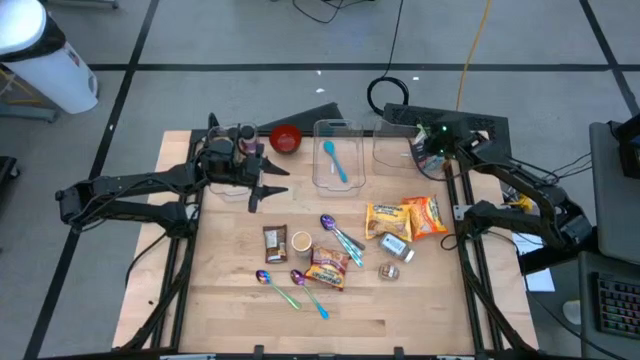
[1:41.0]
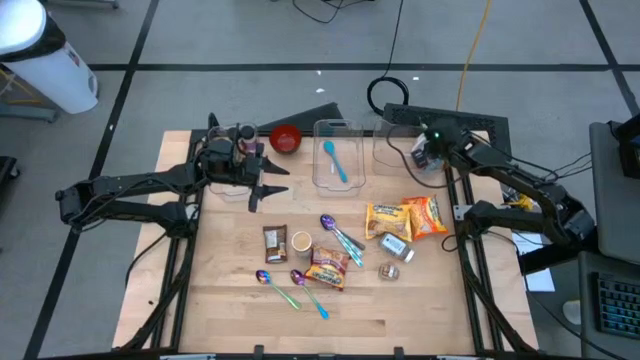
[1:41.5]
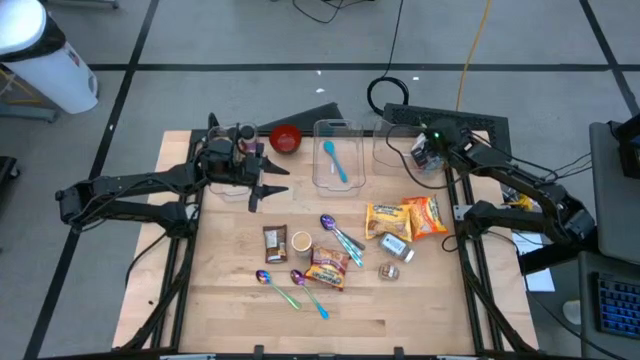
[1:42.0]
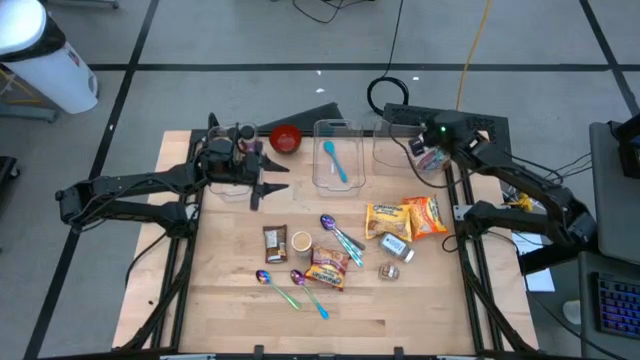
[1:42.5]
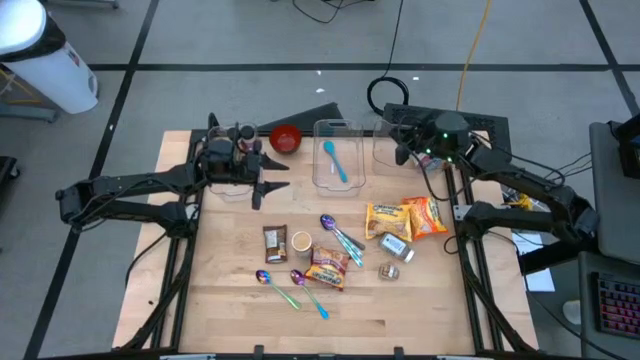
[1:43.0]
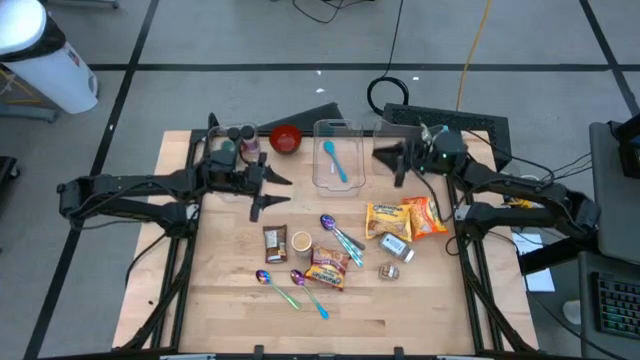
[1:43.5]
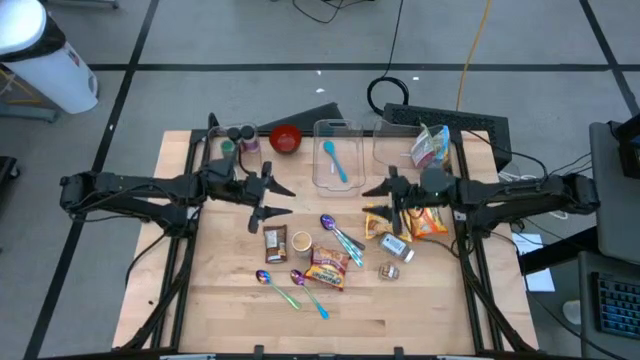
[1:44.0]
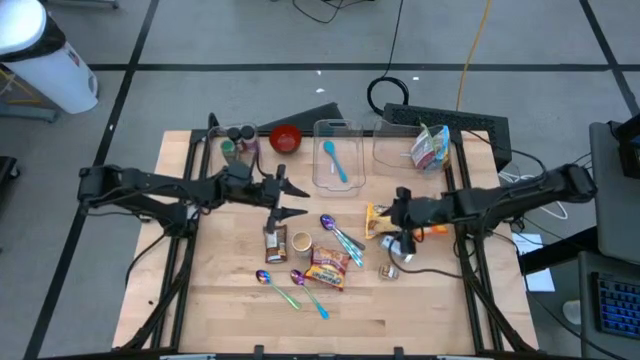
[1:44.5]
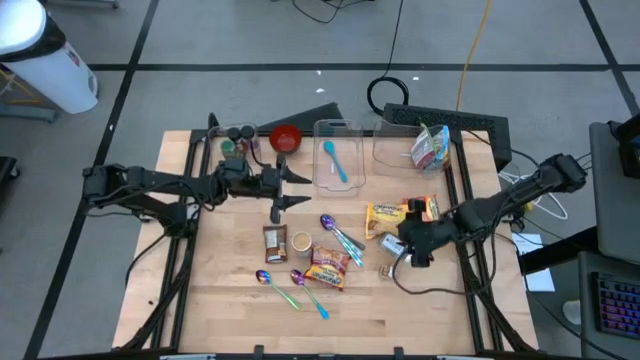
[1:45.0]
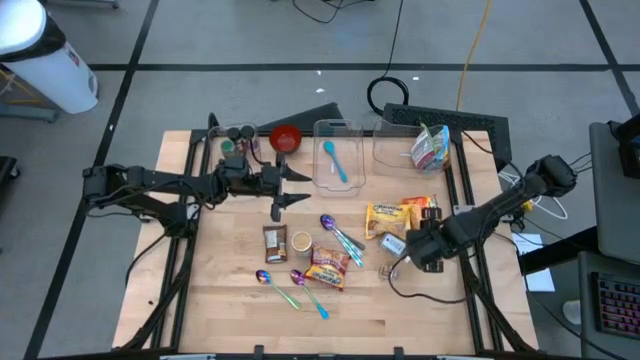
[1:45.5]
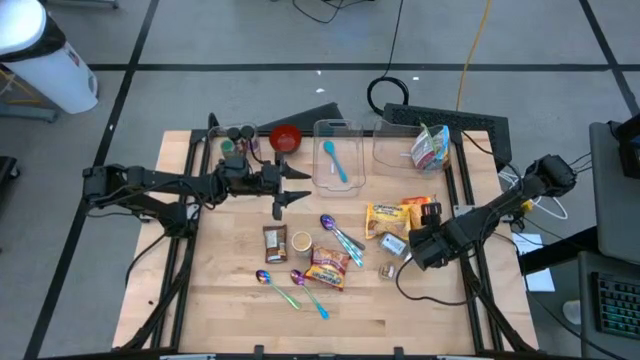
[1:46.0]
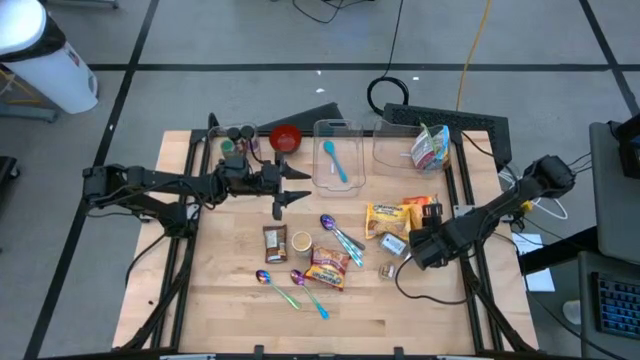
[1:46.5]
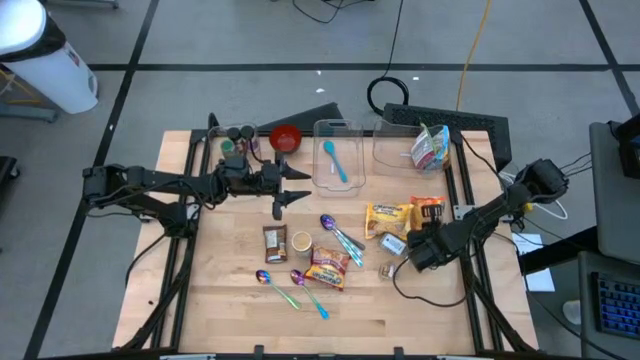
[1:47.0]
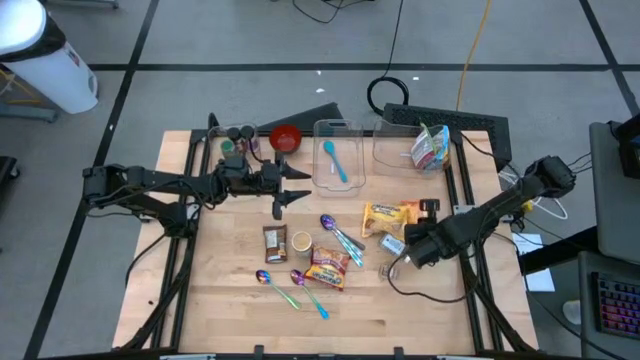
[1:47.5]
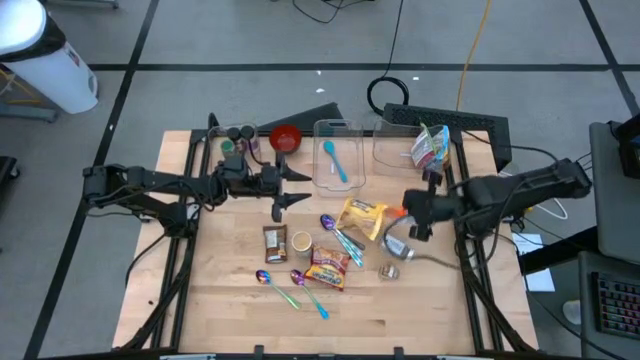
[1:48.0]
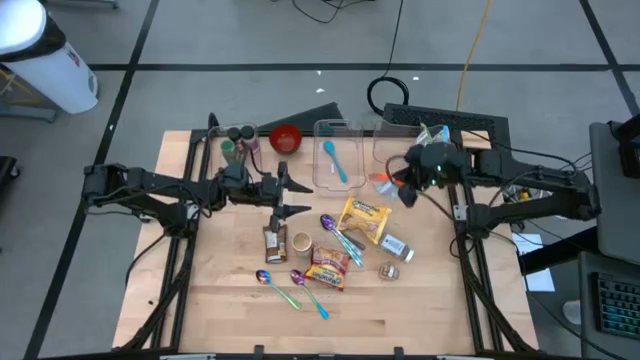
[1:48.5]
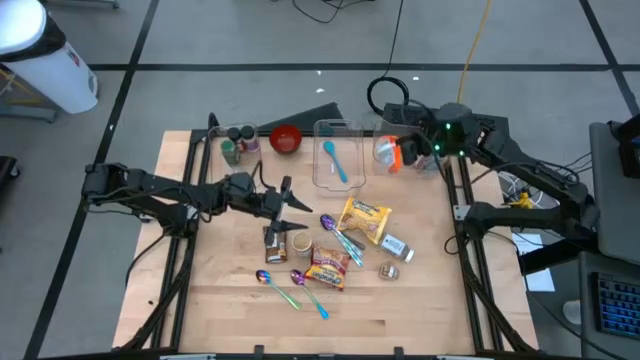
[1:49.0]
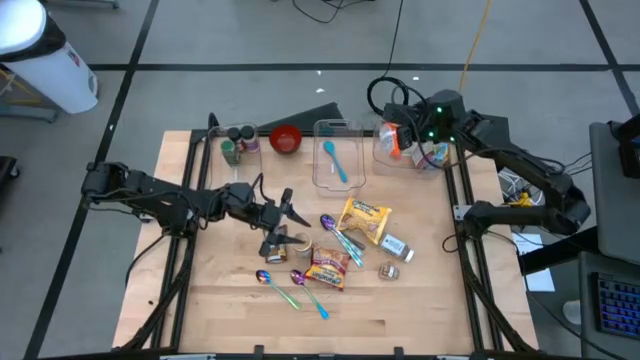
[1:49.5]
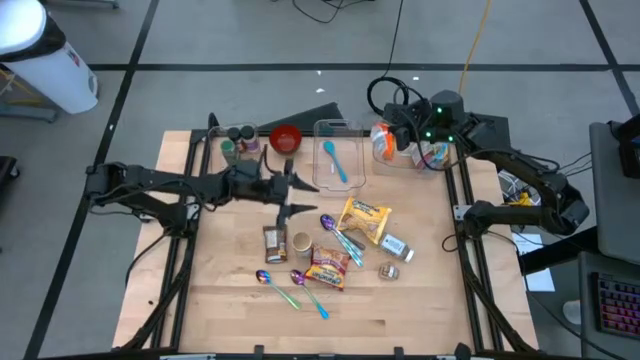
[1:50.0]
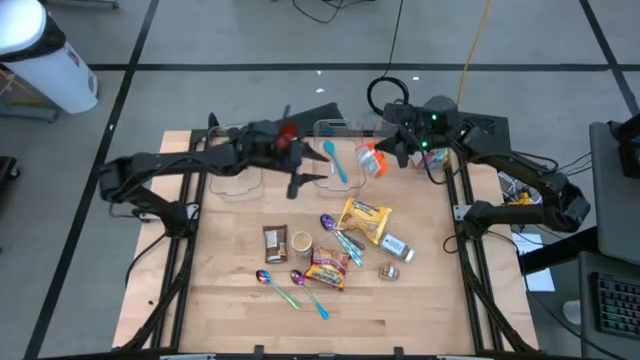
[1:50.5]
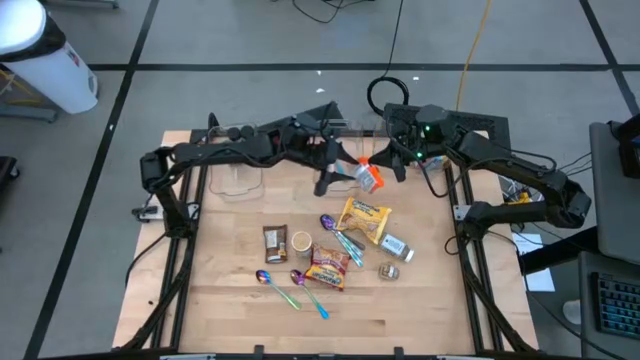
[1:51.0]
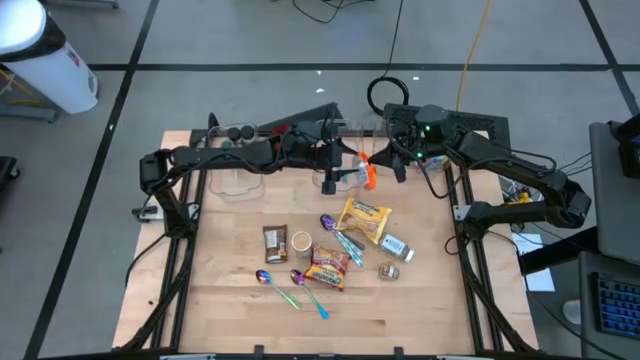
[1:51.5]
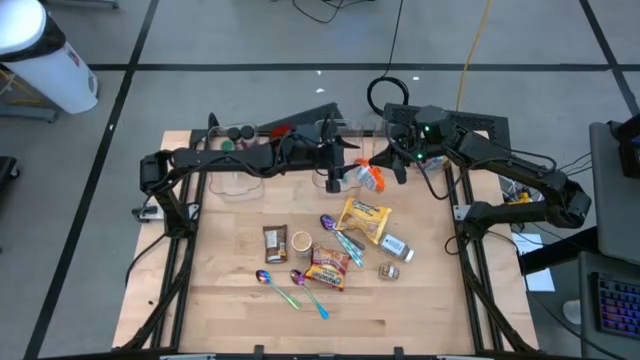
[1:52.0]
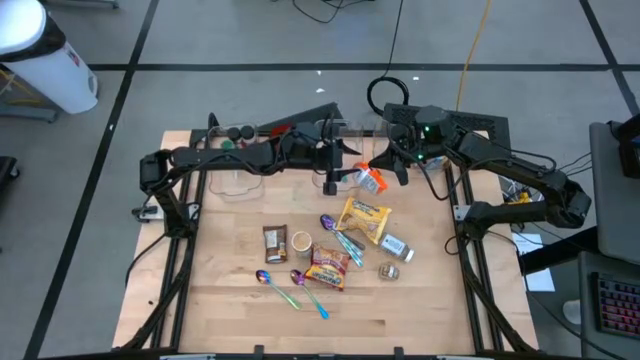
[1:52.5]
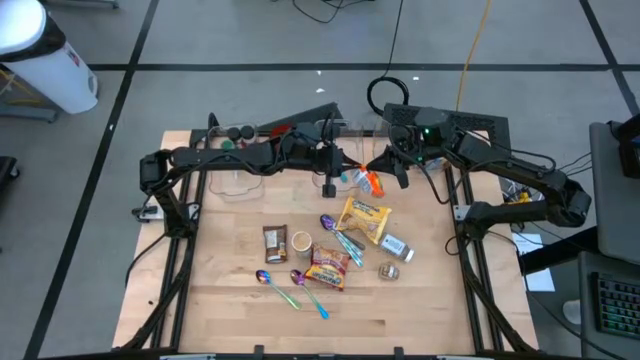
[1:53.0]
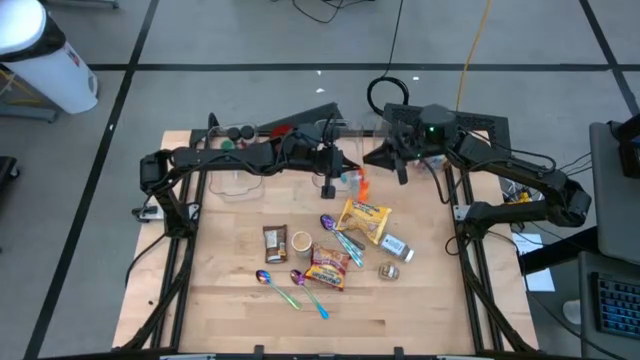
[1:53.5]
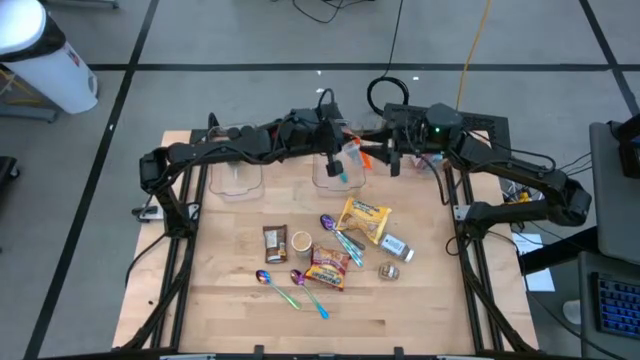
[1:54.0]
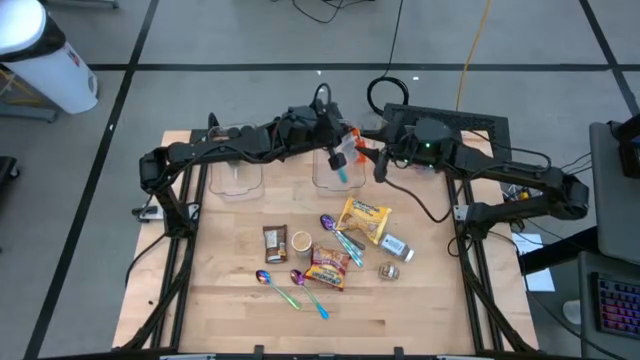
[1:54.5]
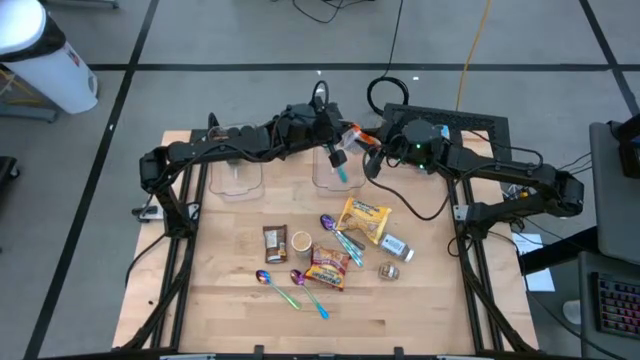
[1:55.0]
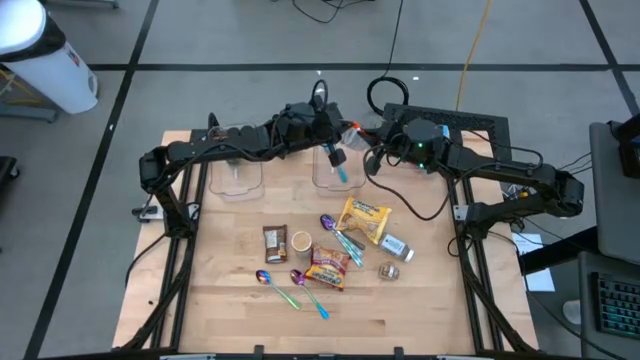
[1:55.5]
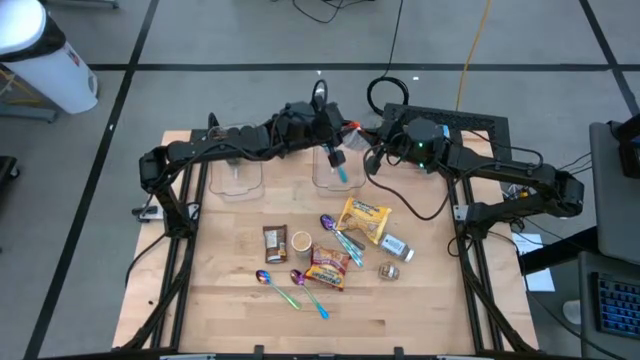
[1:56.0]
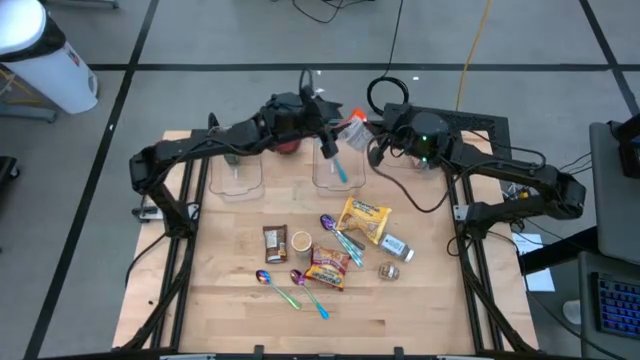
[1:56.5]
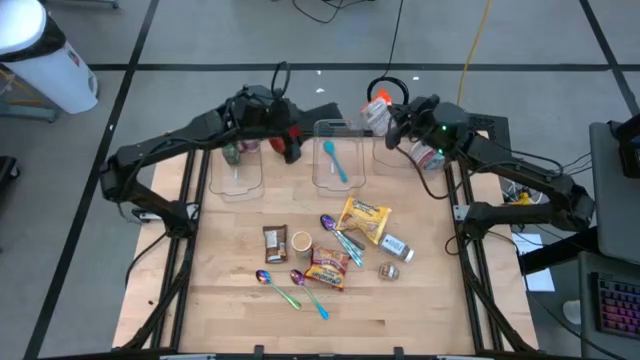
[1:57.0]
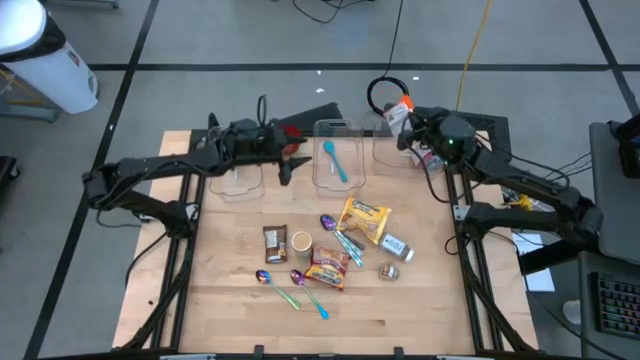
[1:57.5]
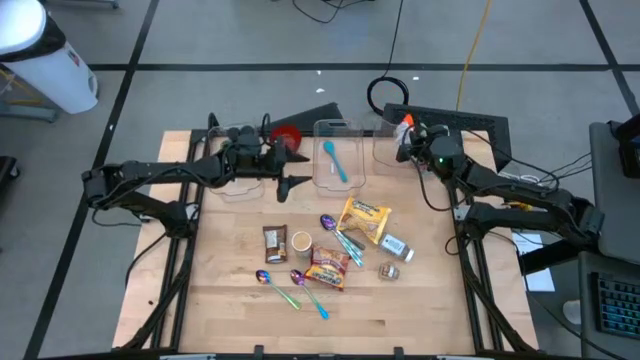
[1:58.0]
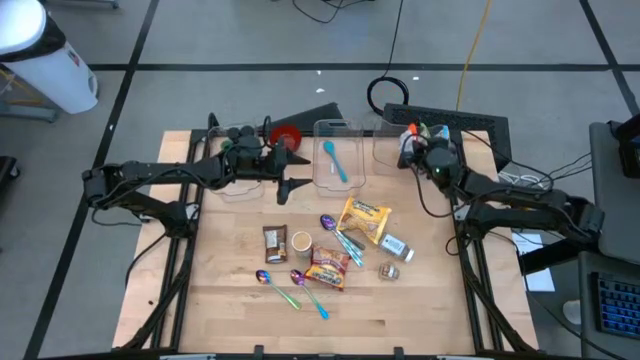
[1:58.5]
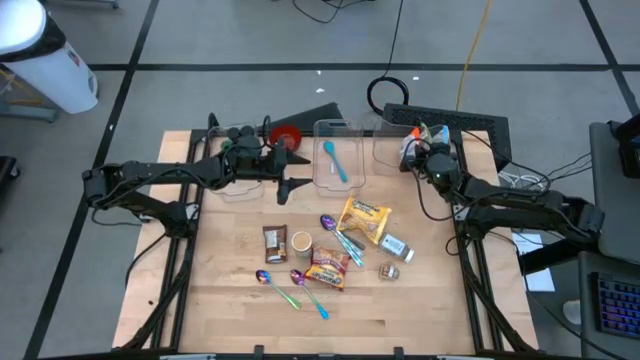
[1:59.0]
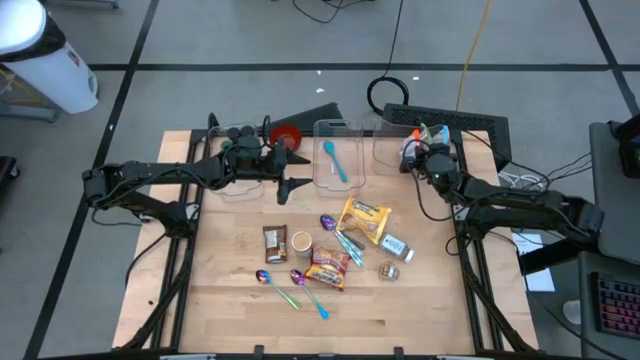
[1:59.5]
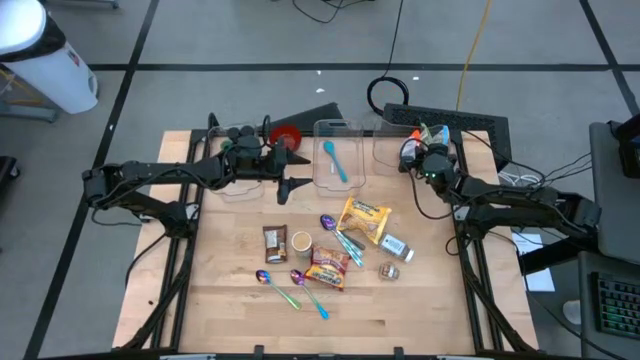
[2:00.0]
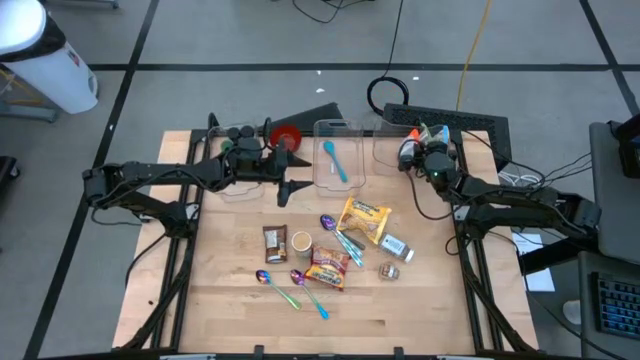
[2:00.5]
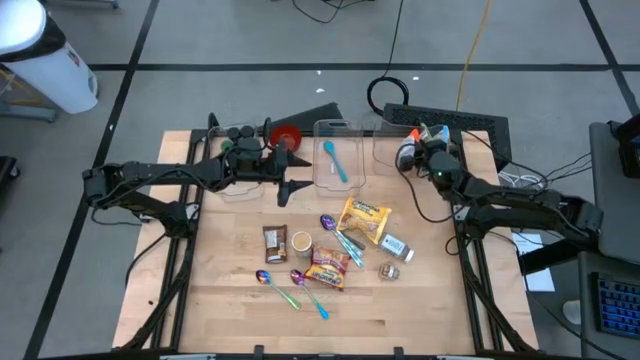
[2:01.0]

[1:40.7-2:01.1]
Task: Pick & Place Food Item
Put the orange noodle pack into the right transparent bin

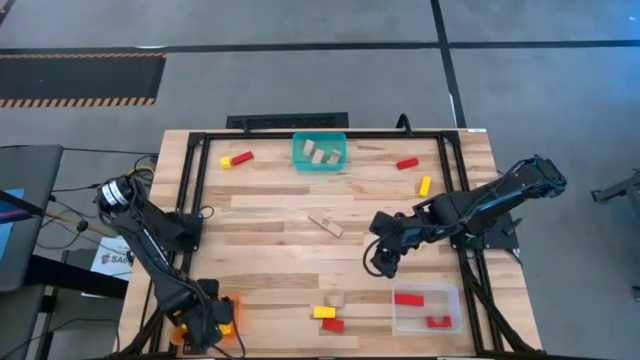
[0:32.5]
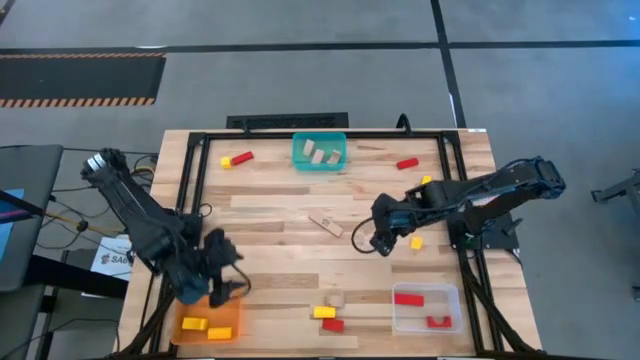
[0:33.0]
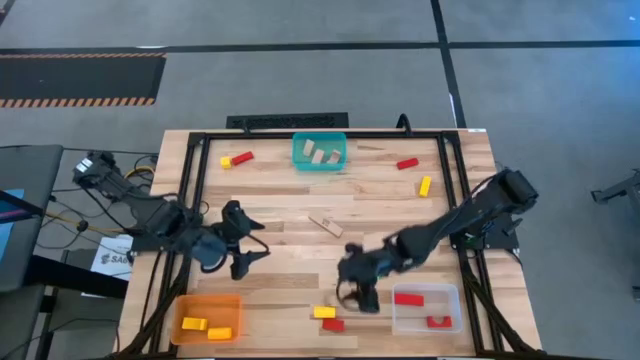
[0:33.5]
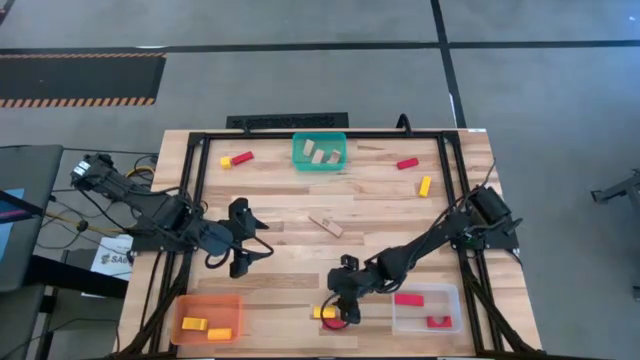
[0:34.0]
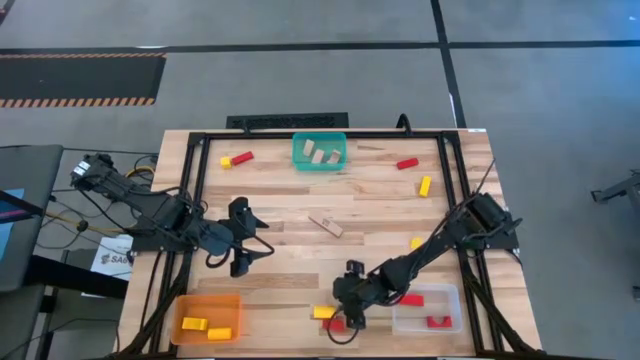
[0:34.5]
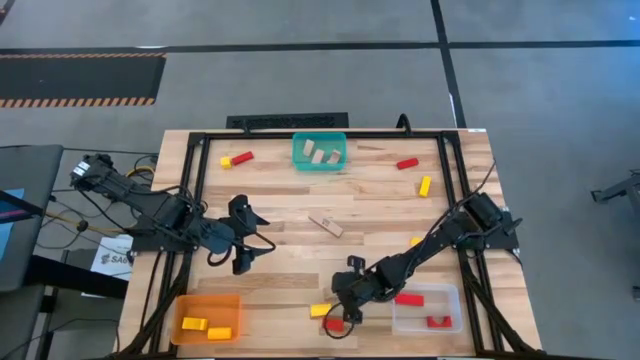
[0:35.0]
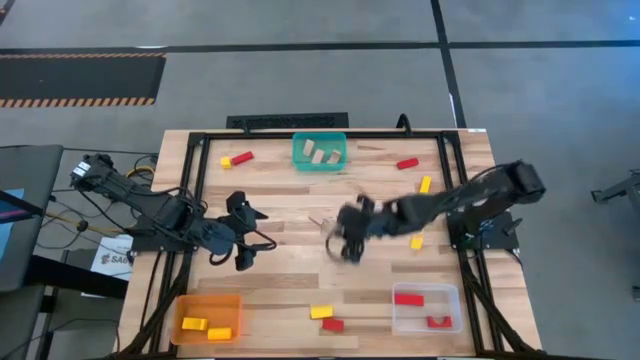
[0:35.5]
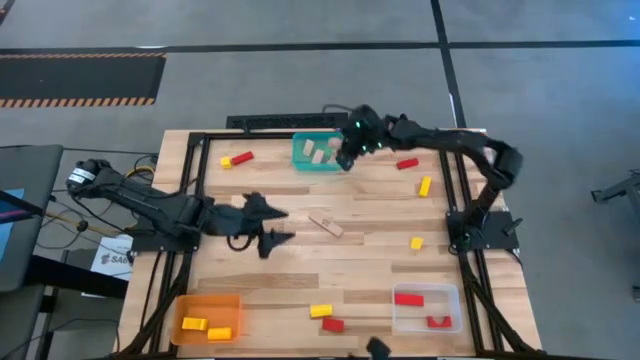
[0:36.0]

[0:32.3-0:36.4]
Task: Sort & place blocks by color
Put the light brown block into the blue bin
